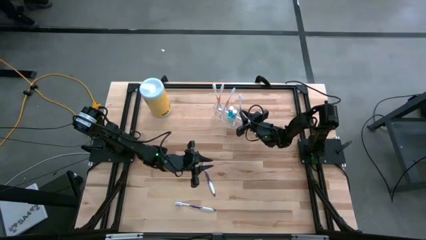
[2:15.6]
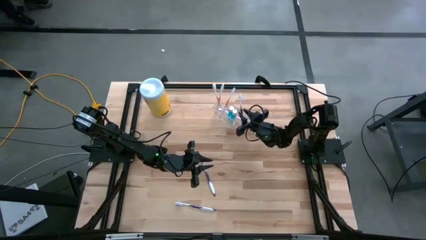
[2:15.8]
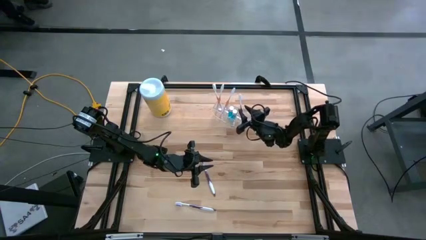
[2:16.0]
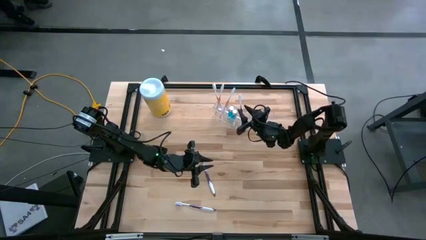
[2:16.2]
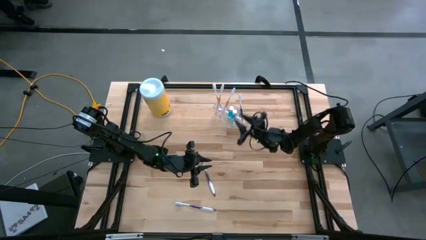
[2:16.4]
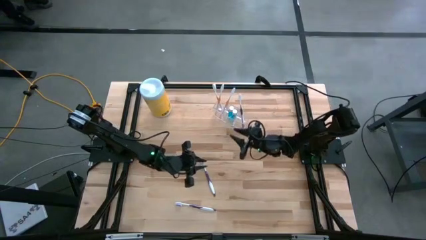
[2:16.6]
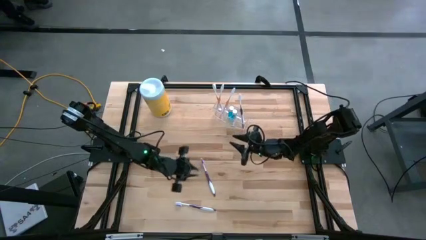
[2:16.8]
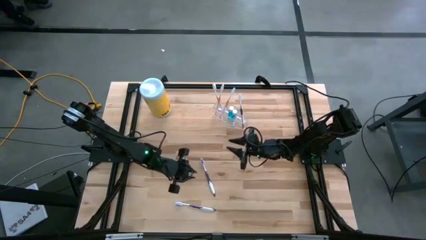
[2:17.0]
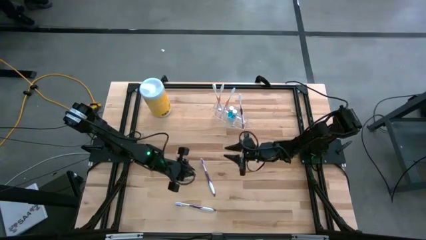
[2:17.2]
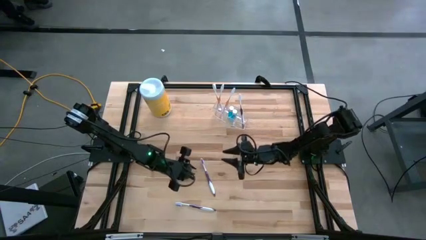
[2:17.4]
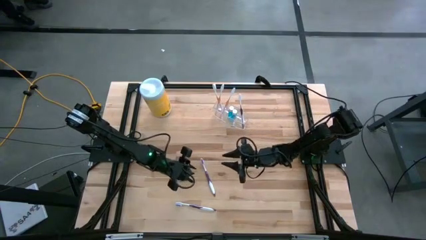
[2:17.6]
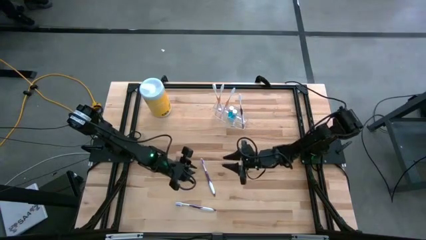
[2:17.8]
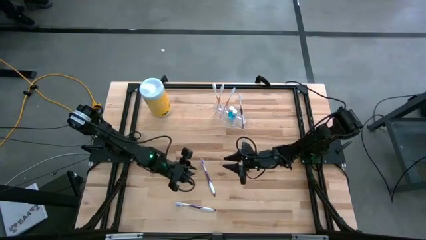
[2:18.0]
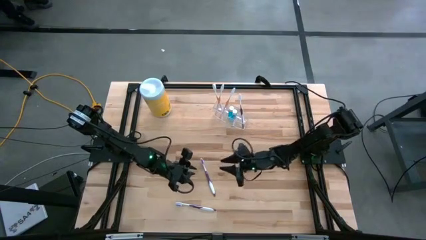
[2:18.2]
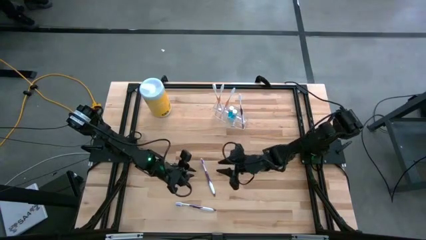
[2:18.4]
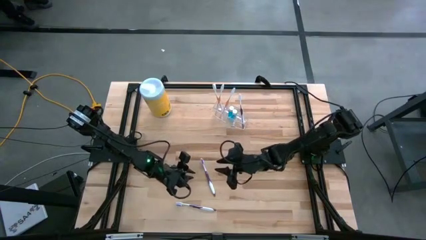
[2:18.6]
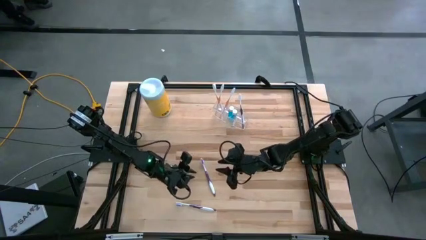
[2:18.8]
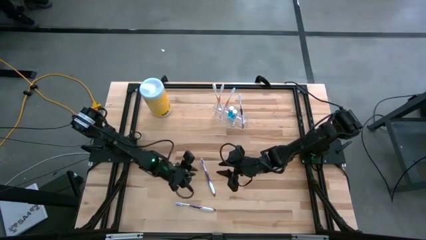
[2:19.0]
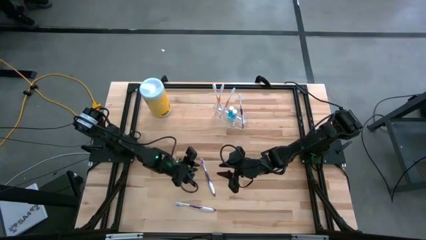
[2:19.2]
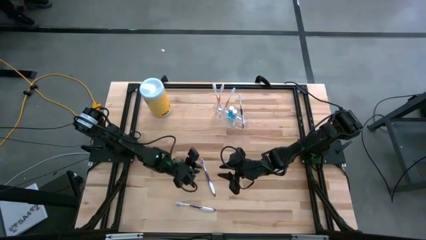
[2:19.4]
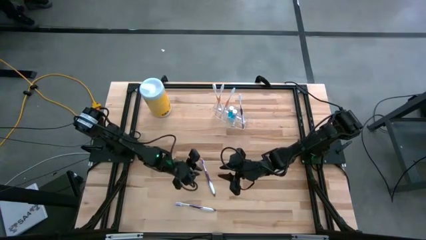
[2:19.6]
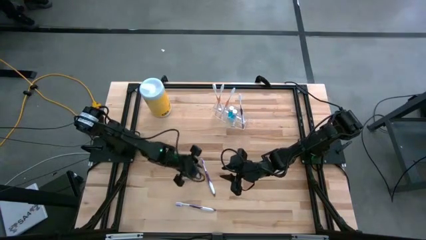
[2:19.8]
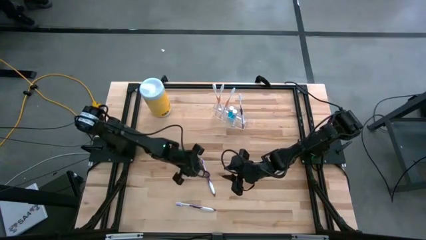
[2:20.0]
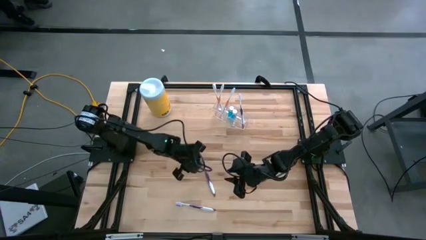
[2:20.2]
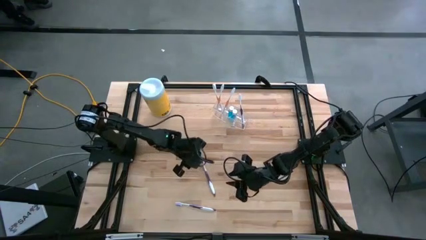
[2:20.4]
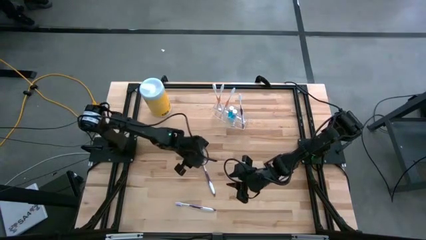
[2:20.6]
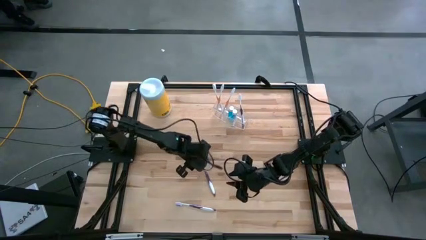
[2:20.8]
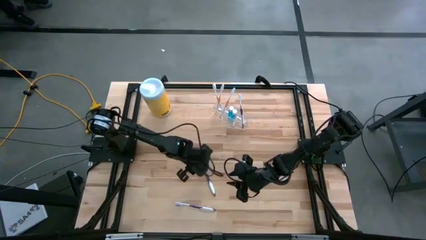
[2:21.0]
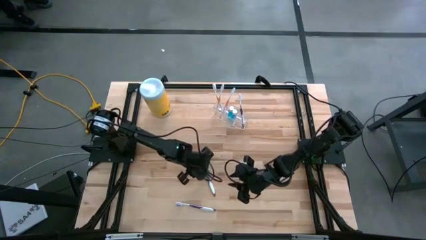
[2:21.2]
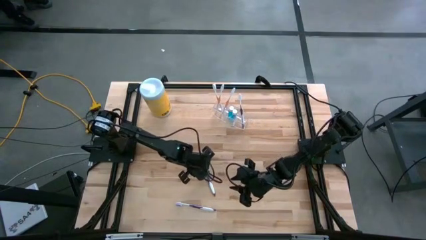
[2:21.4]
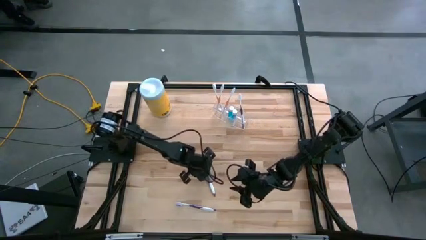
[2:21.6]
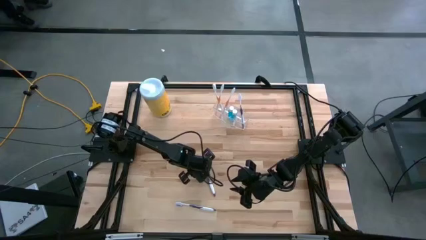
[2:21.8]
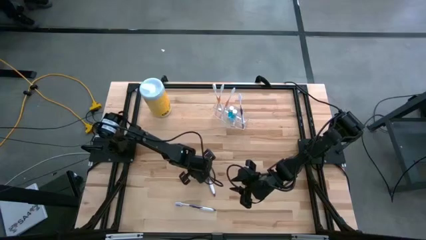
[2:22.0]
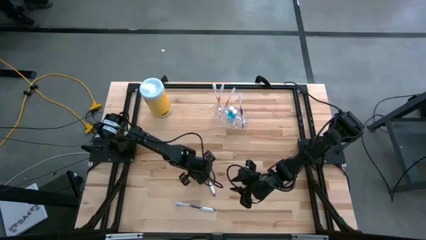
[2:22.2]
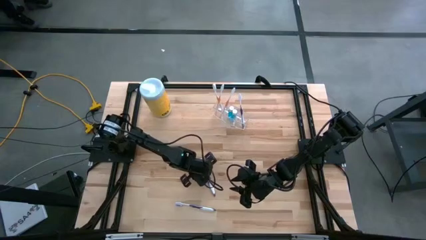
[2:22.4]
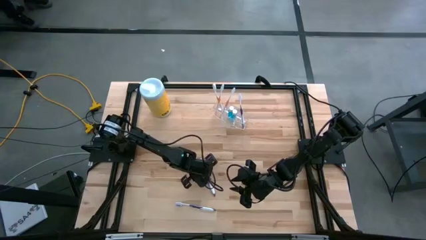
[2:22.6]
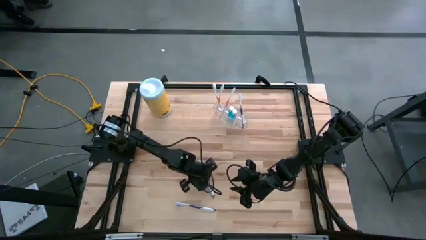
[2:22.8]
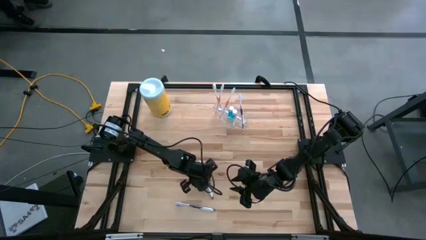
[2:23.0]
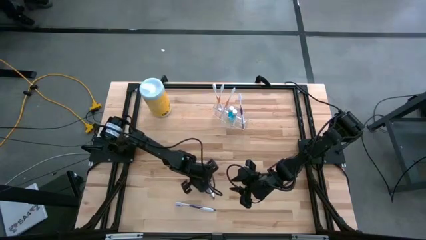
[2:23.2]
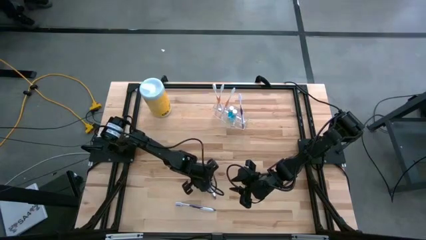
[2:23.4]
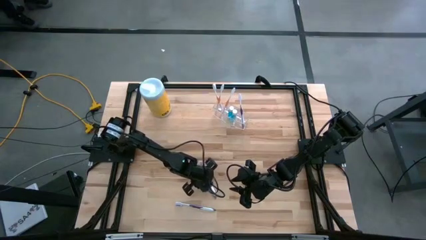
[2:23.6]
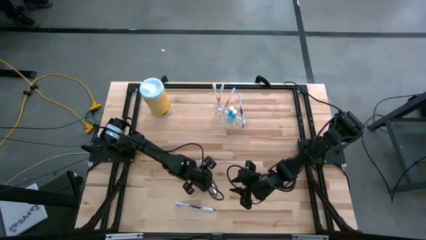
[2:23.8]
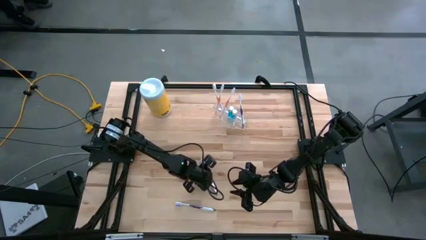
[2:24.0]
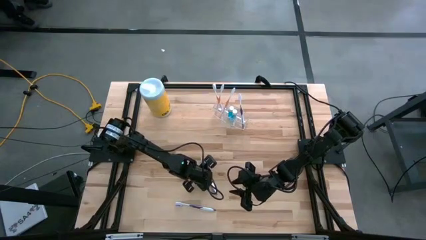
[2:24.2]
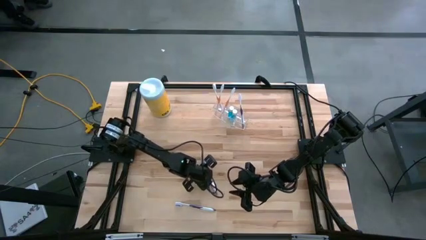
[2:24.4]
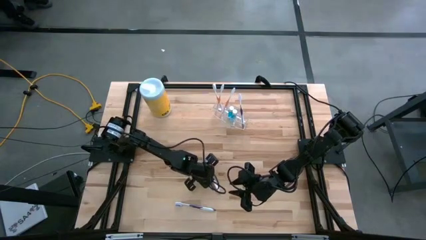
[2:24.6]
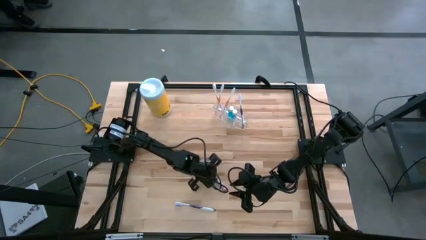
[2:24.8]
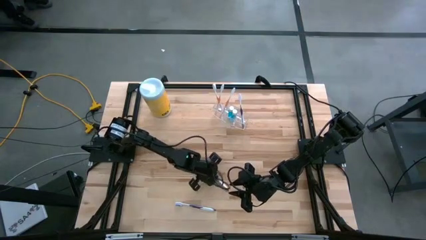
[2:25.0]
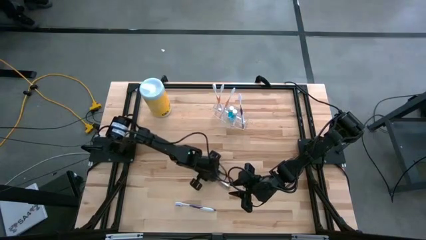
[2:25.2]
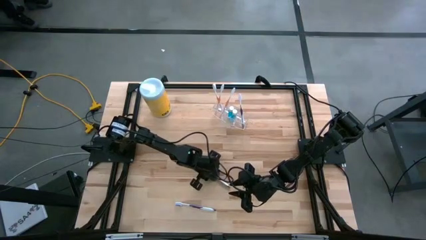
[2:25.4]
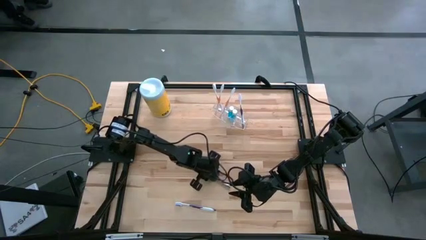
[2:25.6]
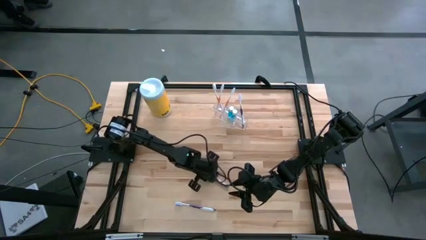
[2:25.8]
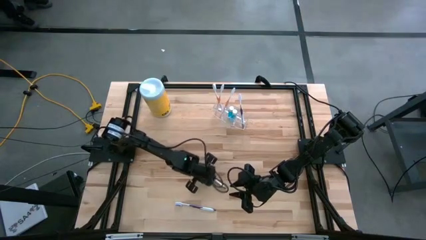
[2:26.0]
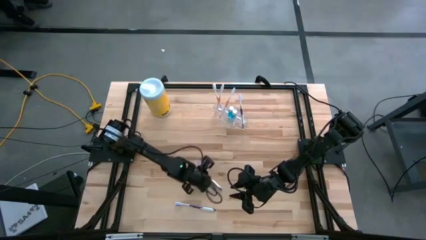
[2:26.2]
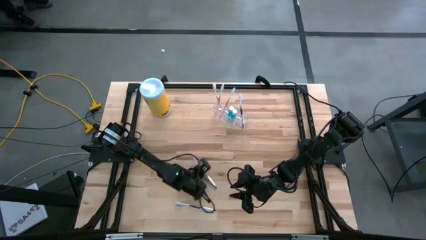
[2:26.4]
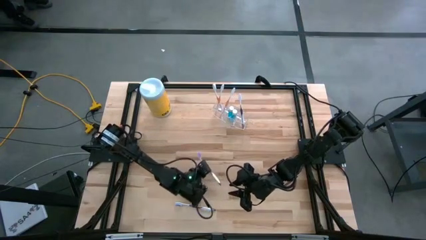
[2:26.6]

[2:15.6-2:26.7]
Task: Pick & Place toothbrushing station
Put the top purple toothbrush into the transparent organizer
